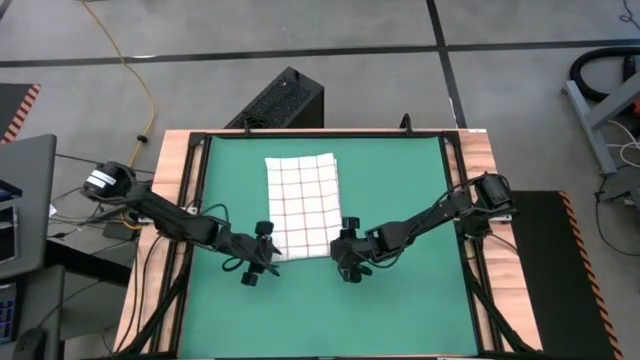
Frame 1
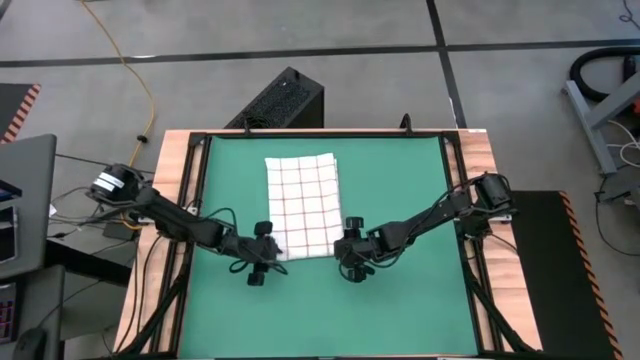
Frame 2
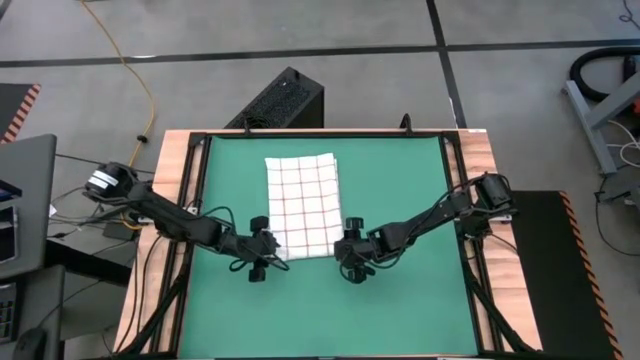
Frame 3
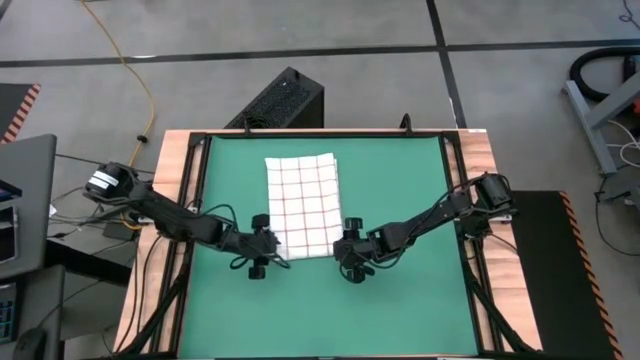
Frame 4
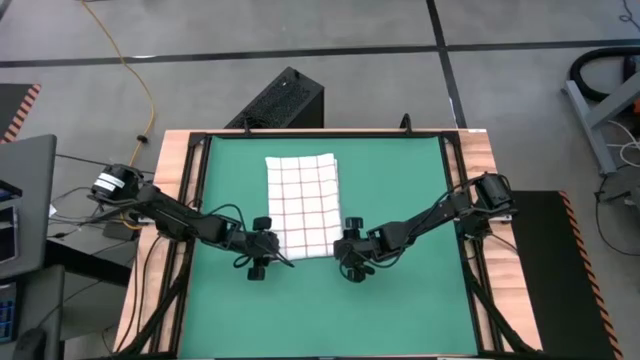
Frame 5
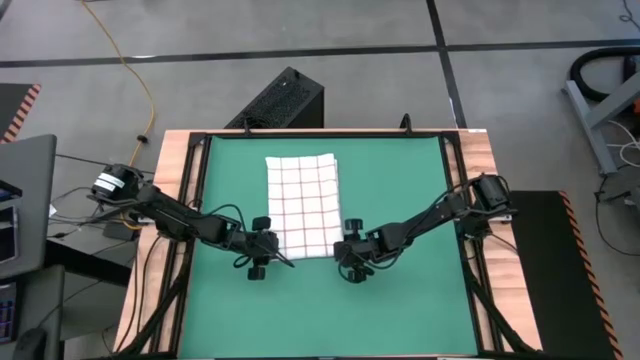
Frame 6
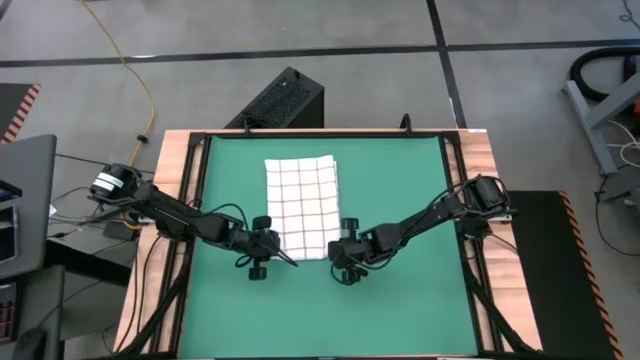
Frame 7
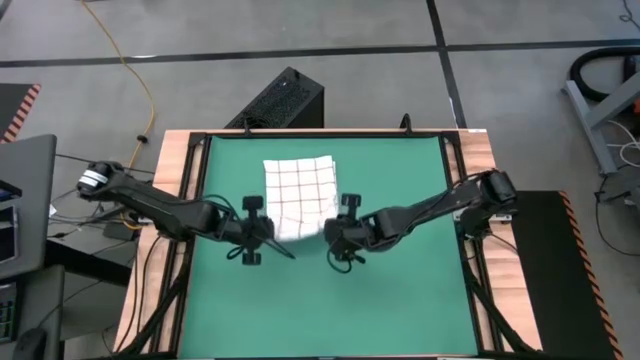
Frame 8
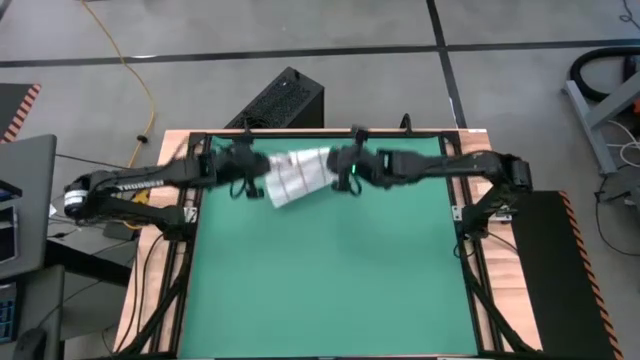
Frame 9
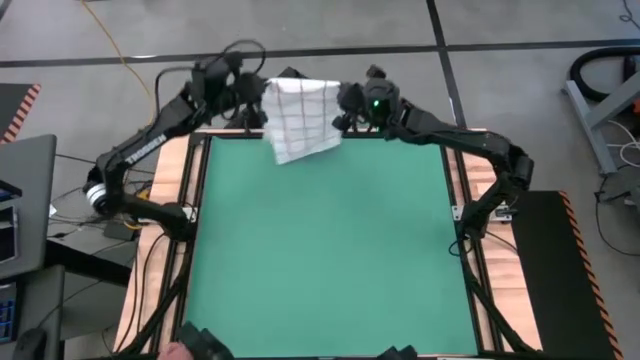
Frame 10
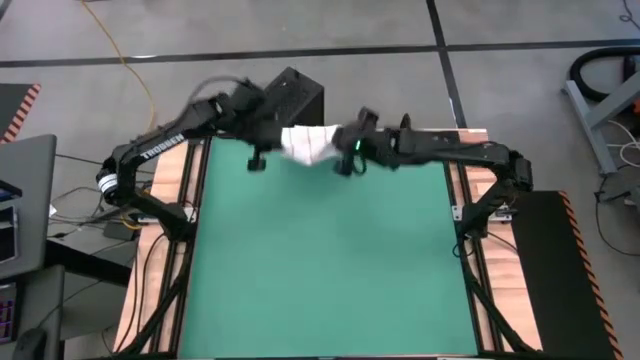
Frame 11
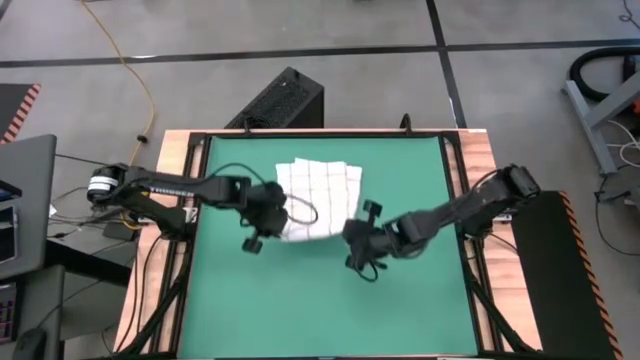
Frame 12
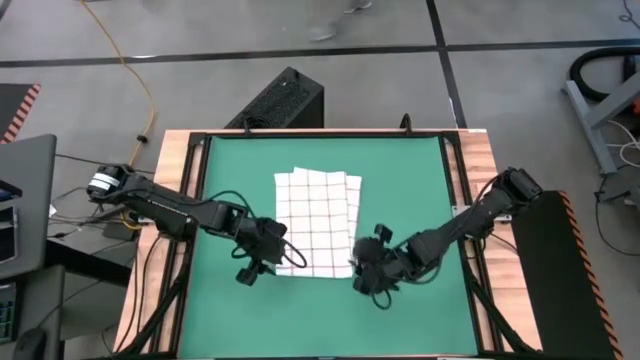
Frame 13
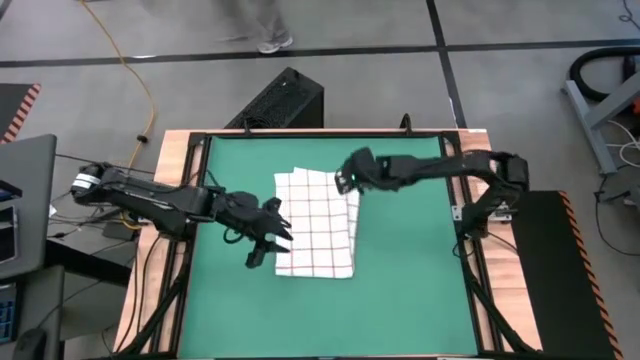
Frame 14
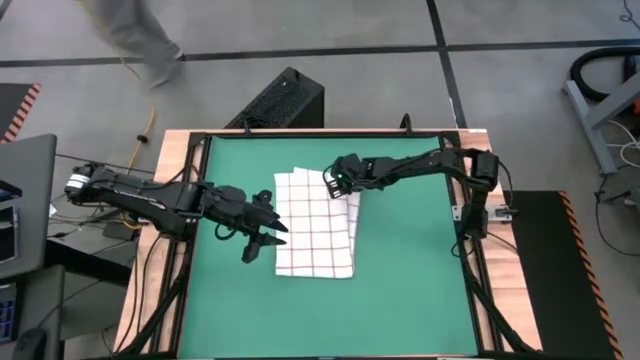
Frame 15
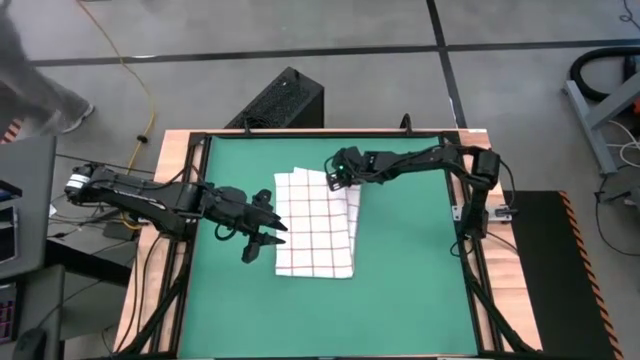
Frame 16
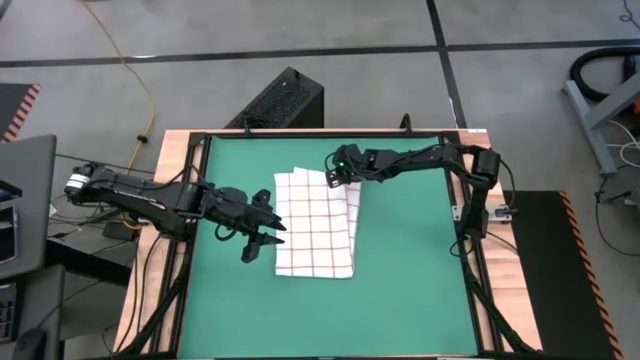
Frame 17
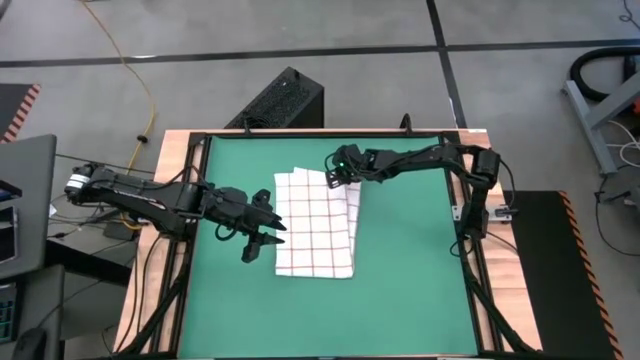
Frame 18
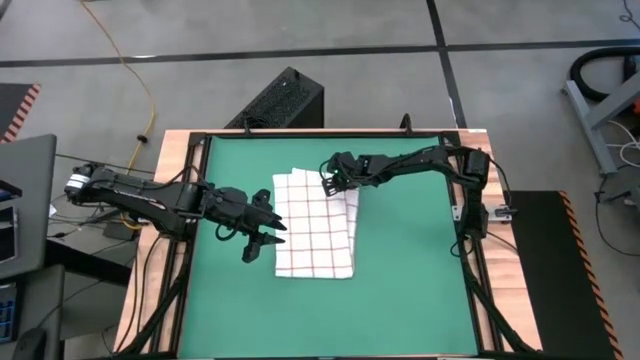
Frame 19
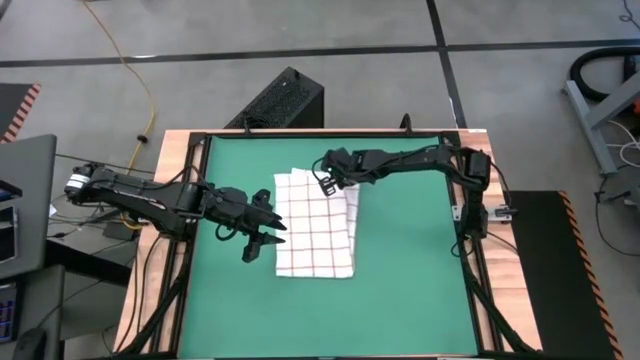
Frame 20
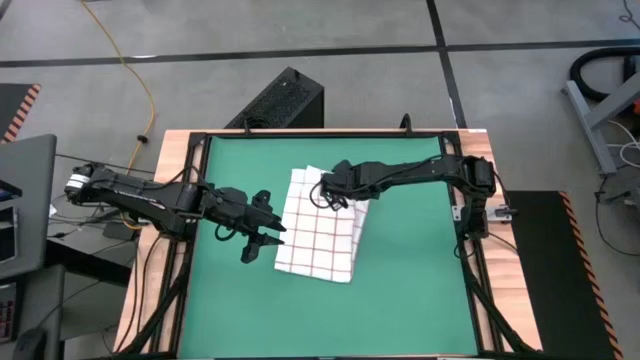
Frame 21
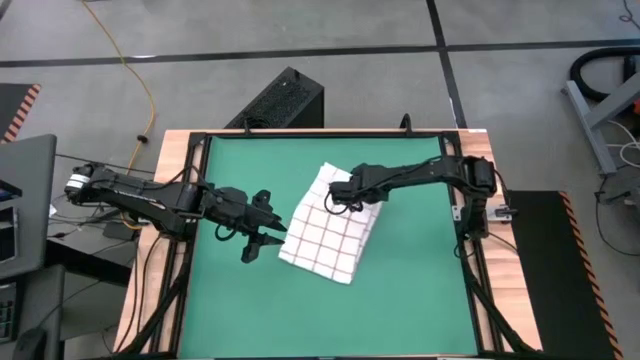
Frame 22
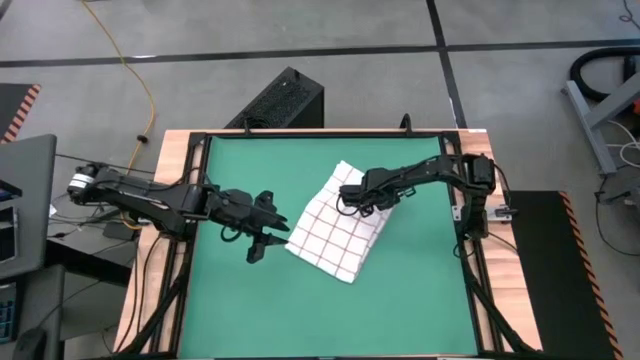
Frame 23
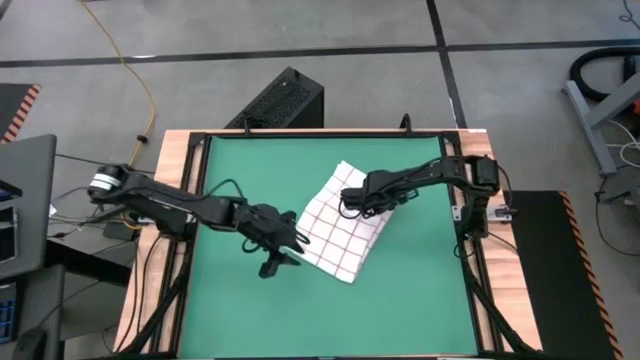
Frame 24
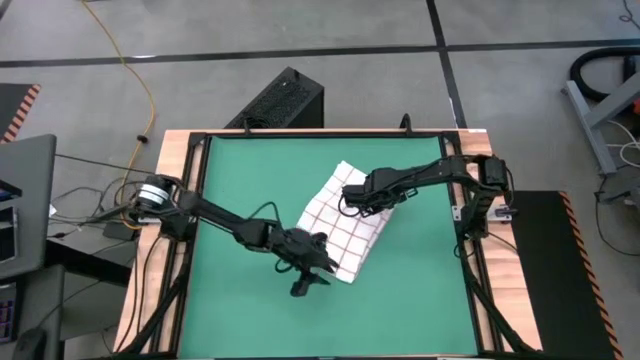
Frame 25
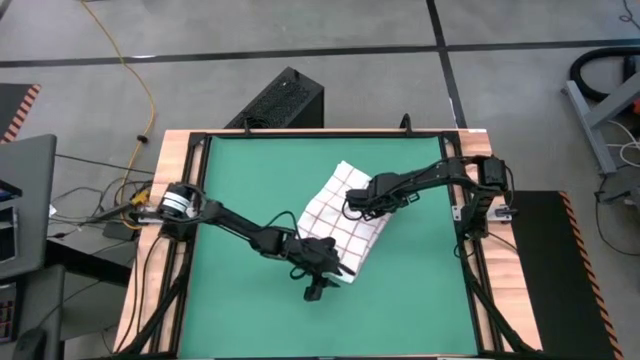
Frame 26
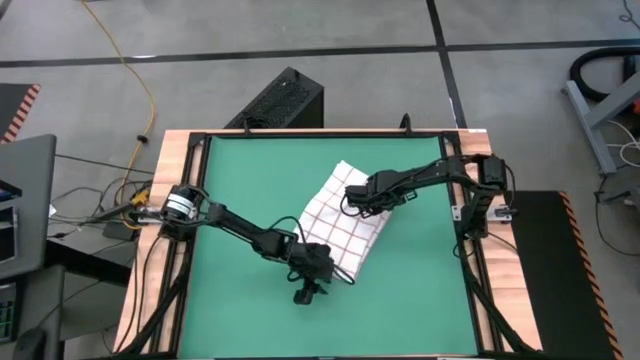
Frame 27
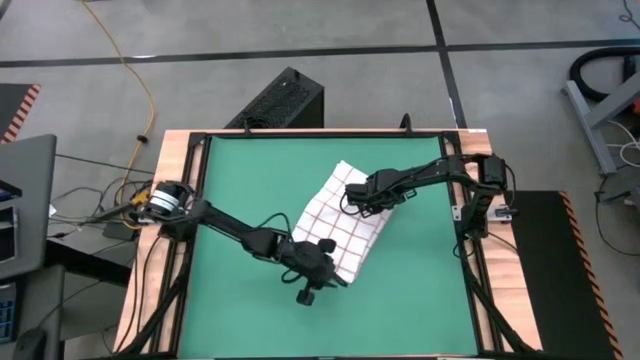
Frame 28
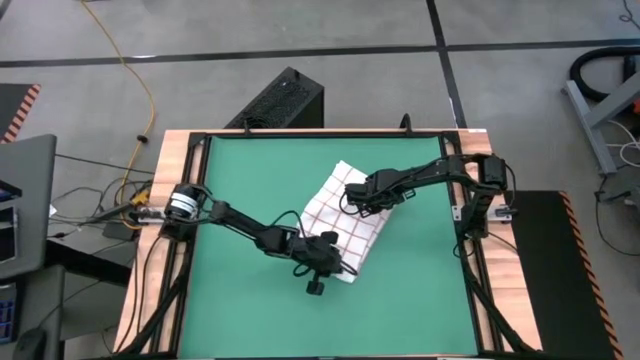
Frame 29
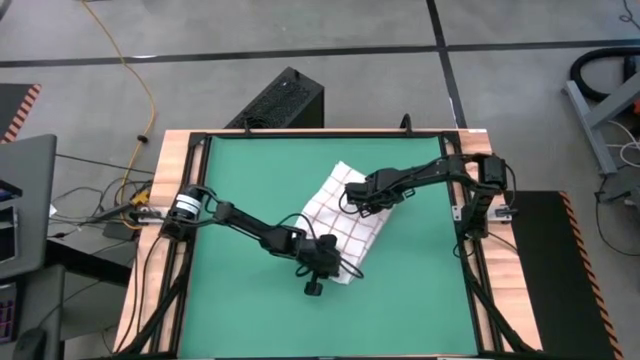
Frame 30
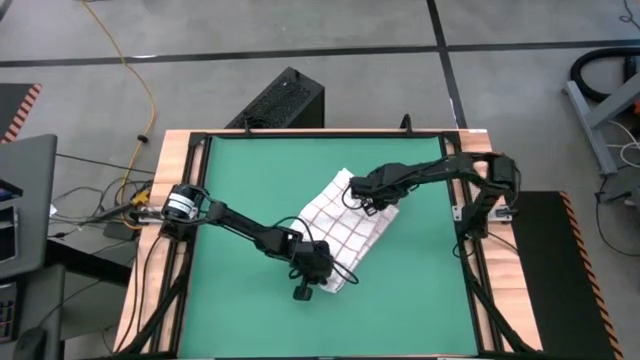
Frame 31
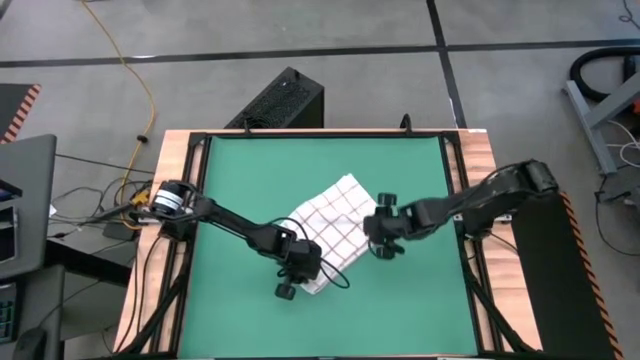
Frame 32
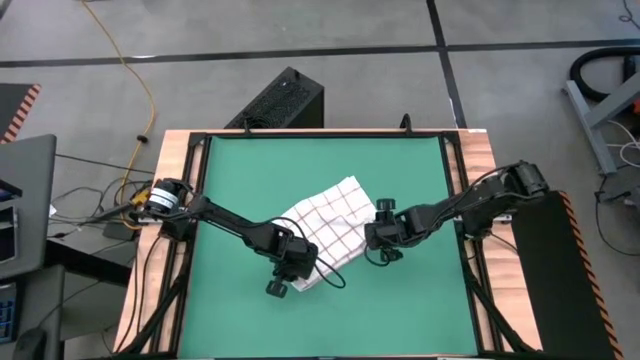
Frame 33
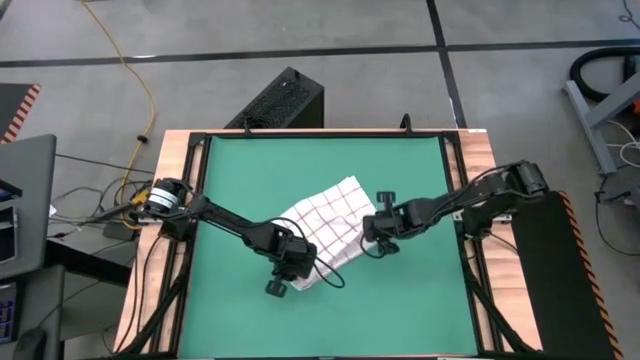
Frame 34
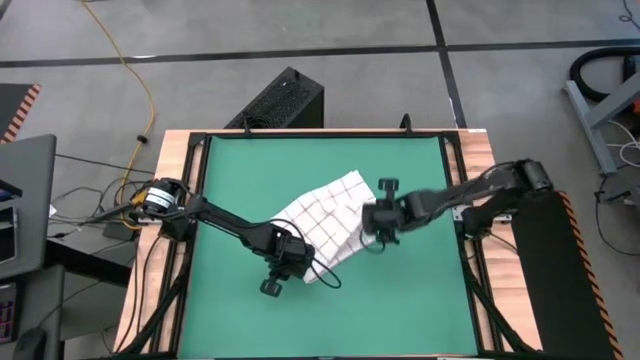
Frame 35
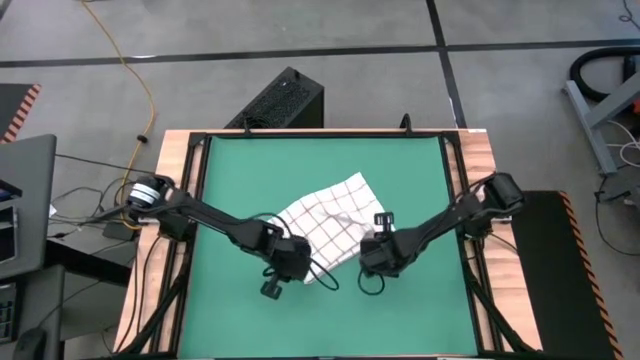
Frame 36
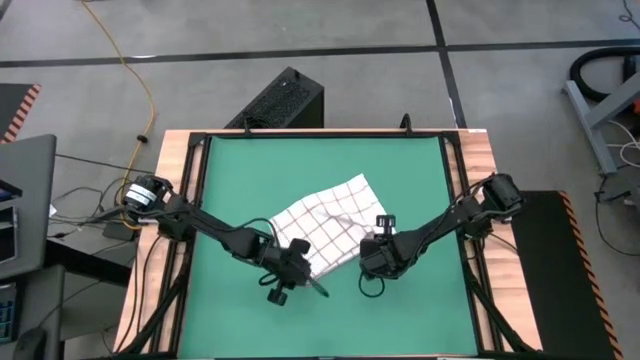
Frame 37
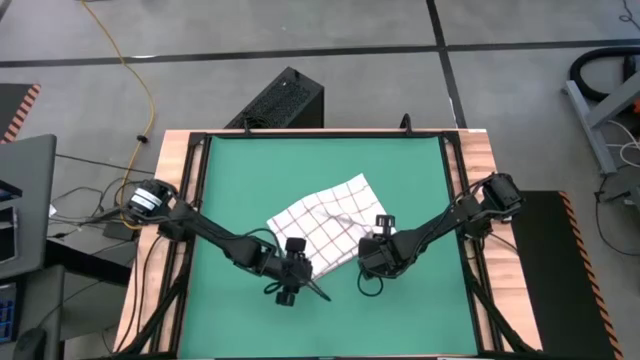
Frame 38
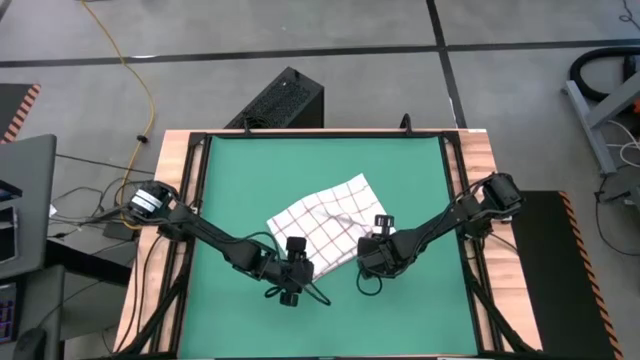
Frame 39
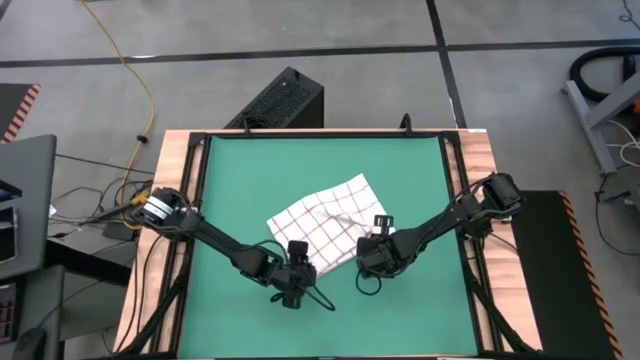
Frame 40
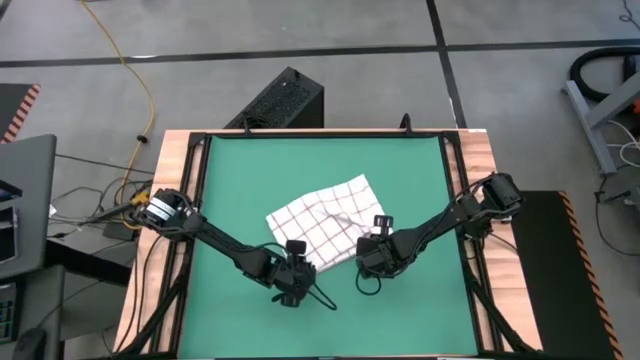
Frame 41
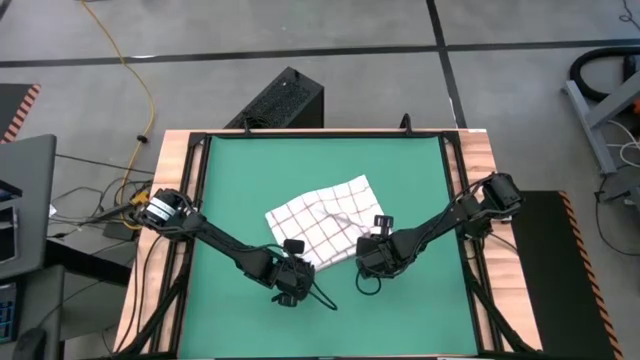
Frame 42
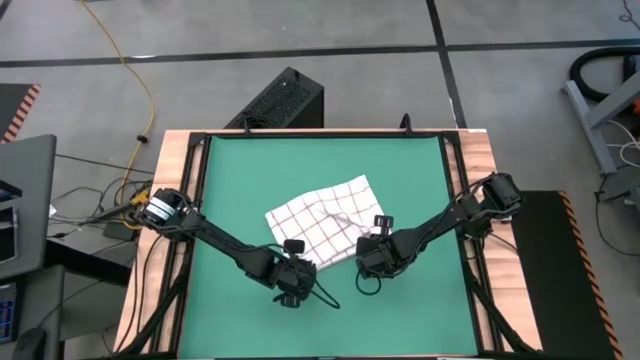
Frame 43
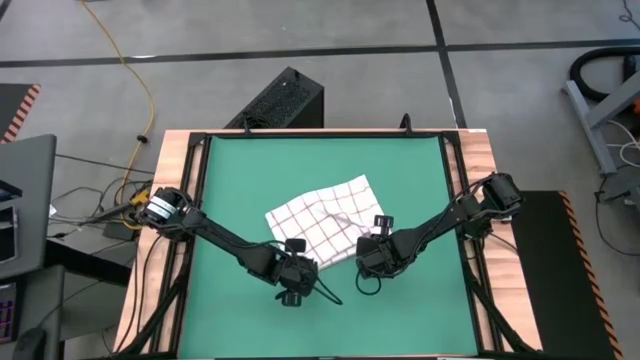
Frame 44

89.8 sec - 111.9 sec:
Task: Roll towel into tight, uniform cylinder
Roll the white patterned towel
